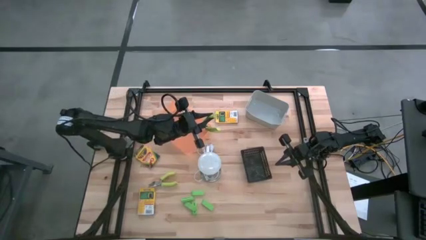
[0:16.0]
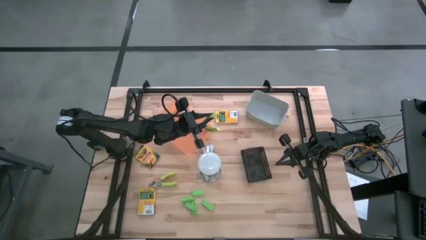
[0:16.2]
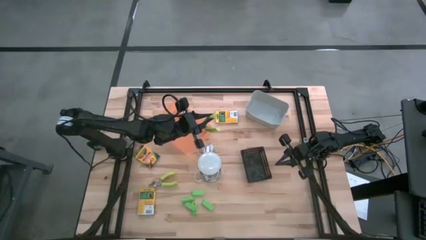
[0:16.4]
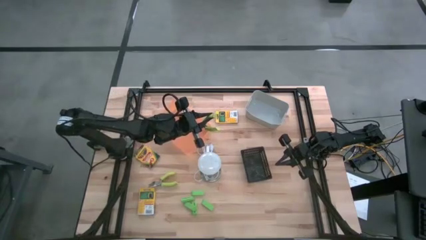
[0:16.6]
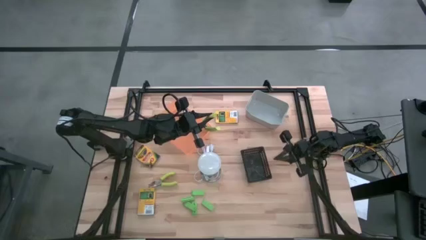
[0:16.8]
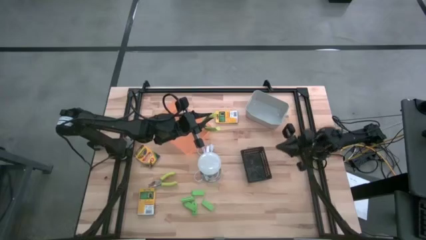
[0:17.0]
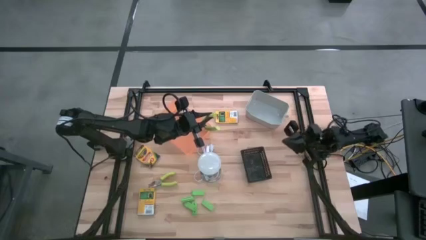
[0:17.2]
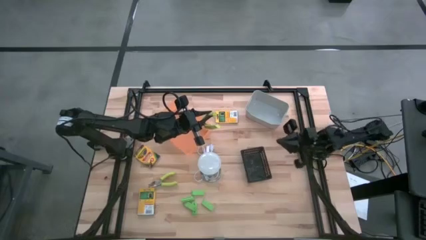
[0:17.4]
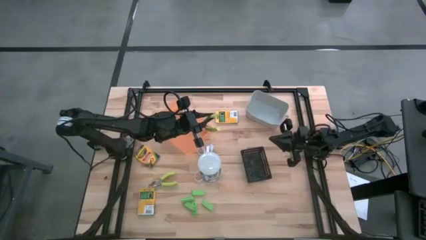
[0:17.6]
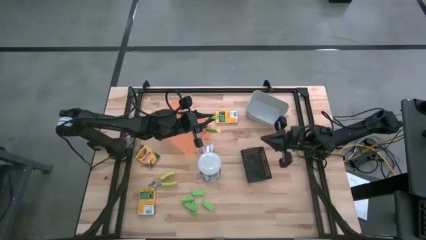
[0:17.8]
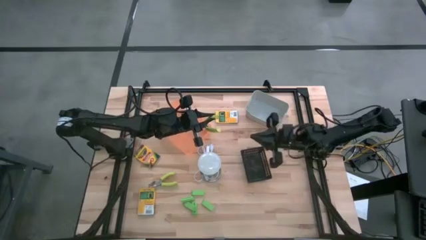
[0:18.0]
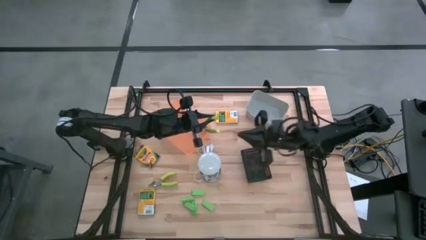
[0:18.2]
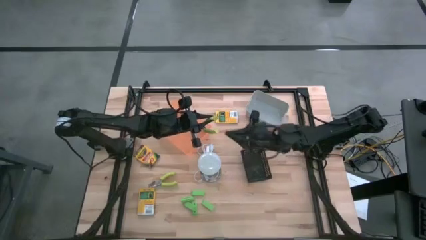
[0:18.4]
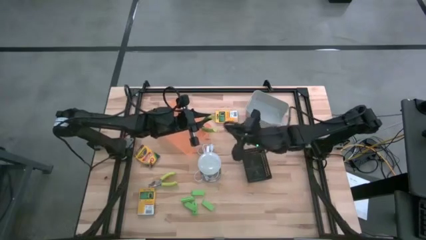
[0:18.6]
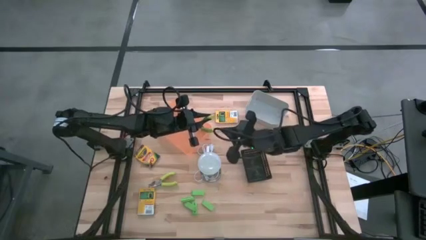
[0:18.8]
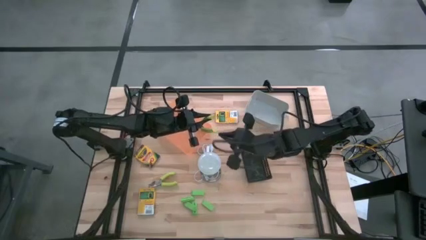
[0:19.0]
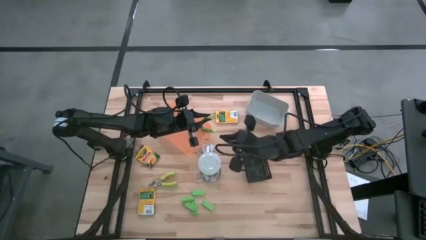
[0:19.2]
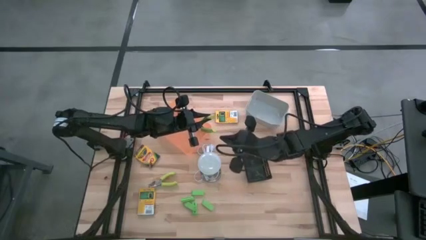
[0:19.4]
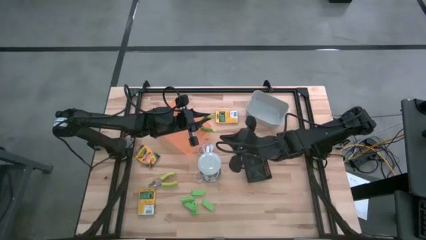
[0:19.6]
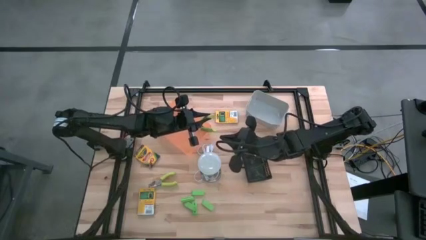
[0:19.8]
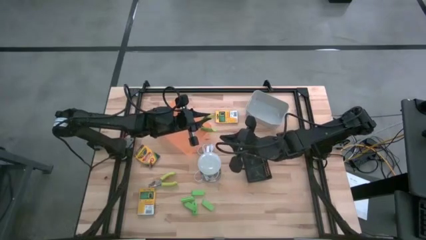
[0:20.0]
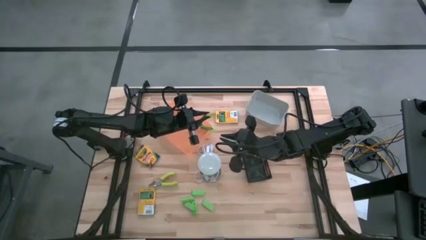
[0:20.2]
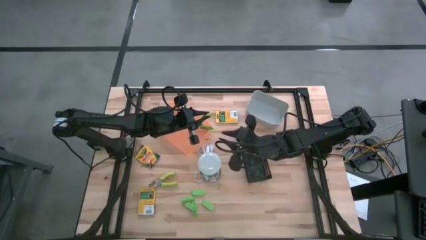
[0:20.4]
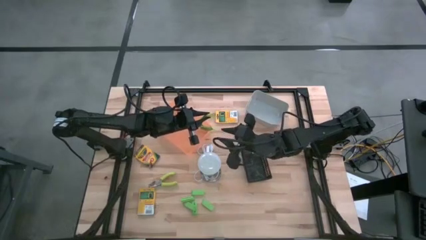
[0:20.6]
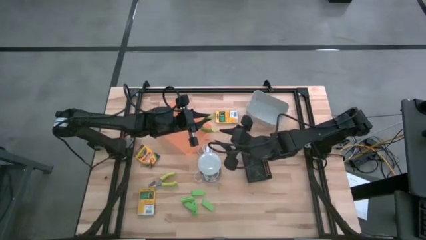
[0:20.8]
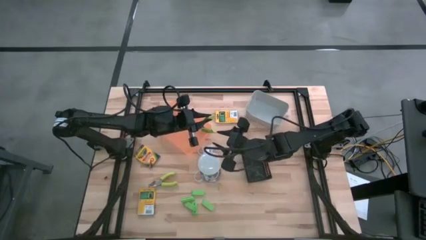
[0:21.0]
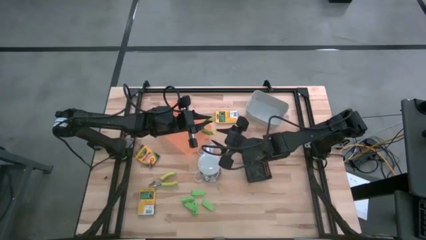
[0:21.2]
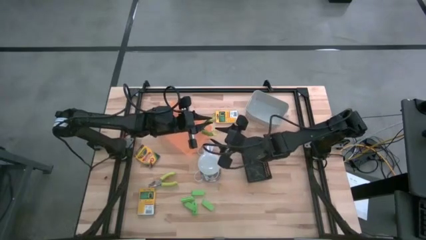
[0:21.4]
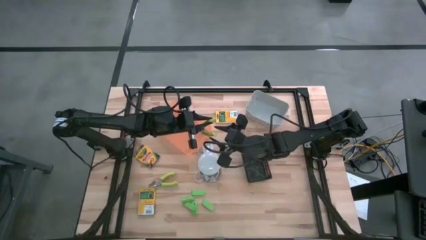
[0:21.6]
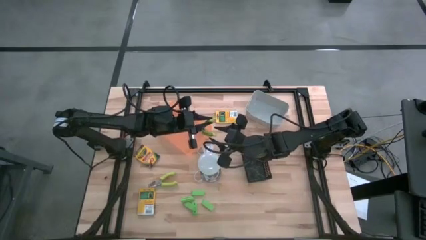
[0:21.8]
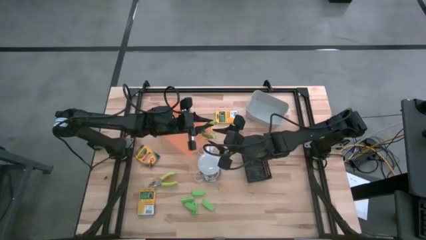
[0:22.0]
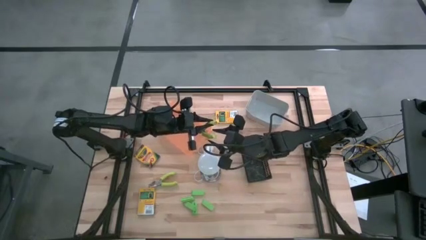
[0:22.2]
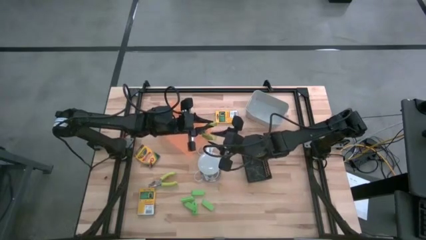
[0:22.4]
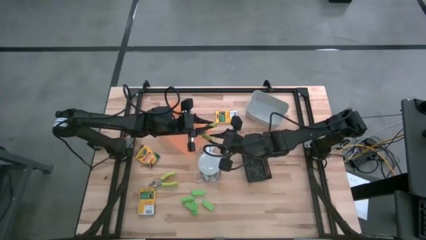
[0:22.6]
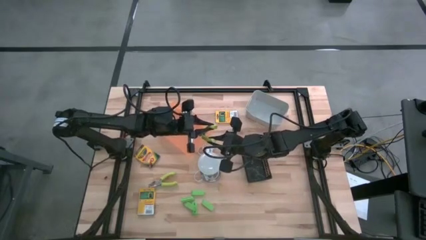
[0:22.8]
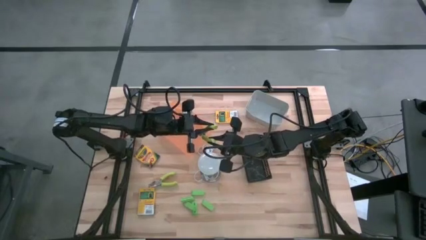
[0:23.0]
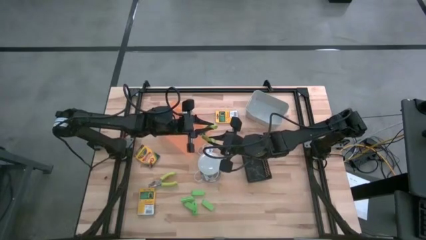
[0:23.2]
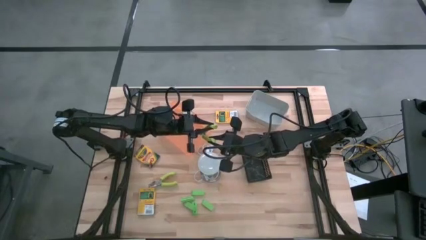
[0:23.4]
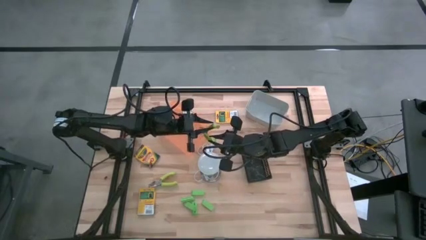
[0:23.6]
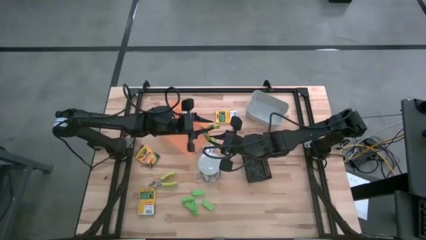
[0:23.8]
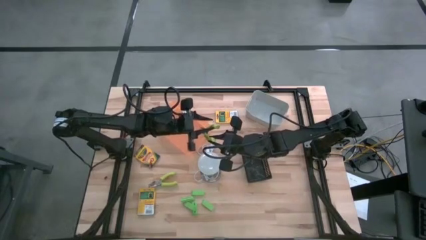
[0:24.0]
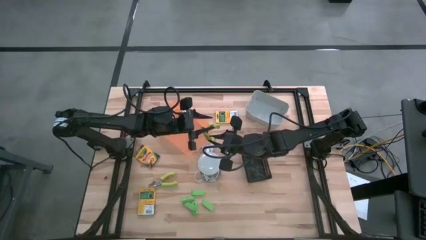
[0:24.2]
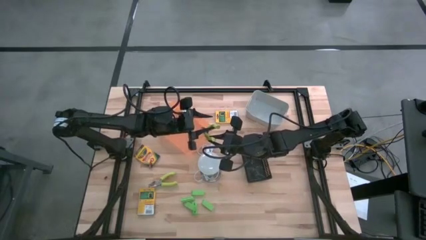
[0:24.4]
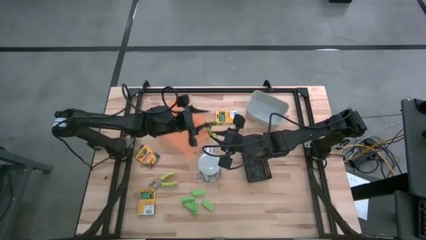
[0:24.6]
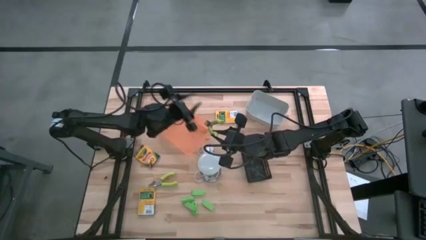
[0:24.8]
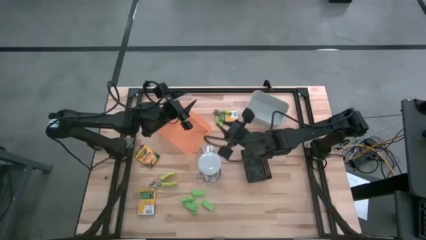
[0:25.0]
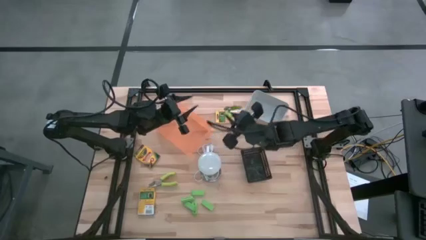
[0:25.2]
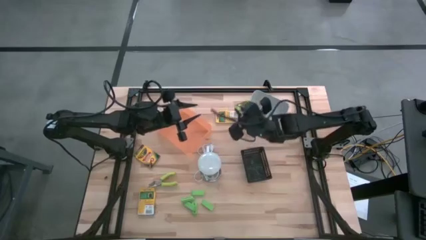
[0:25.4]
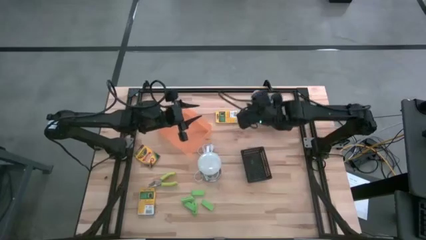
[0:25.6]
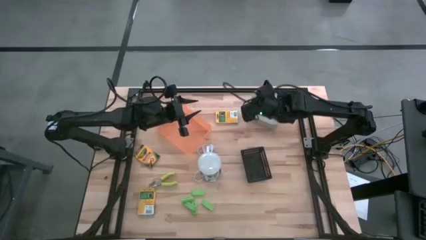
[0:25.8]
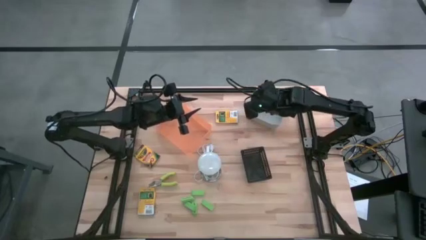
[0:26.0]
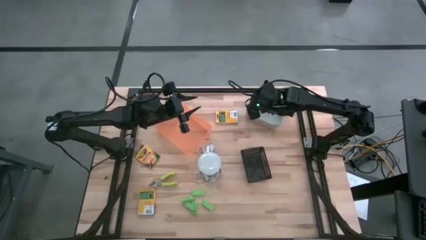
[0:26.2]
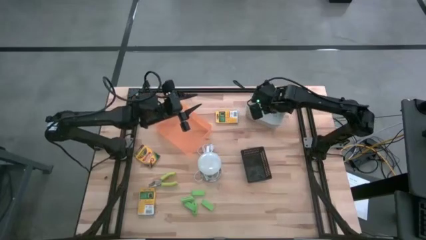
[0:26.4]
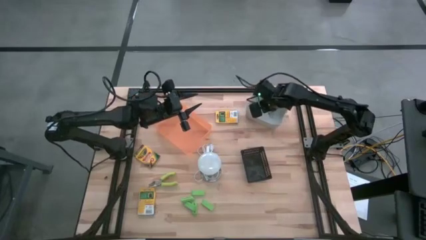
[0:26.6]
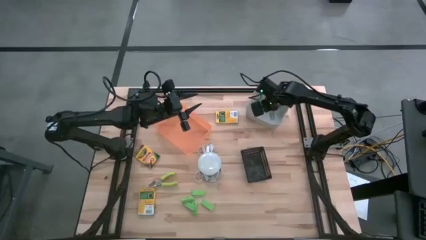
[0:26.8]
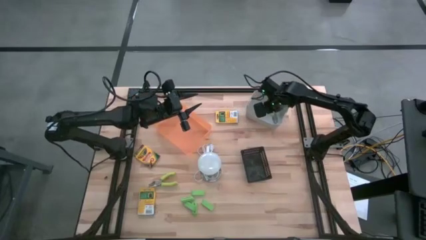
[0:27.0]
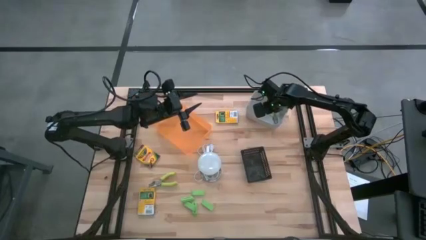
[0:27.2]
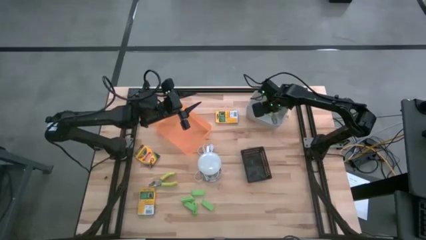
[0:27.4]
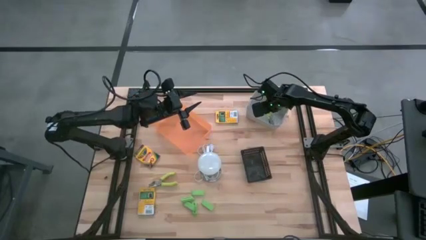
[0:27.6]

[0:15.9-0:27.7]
Task: Pick & Place School Supplies
Put the green punch plier into the gray bin

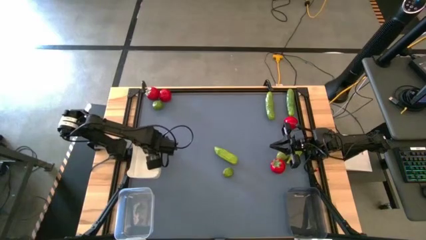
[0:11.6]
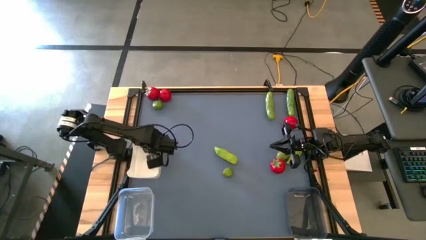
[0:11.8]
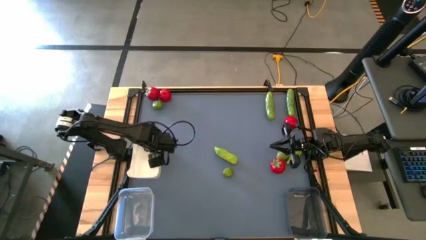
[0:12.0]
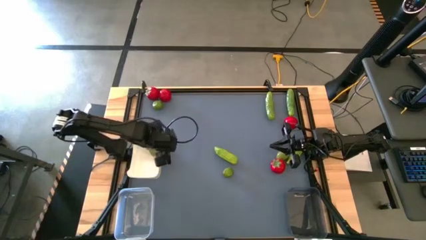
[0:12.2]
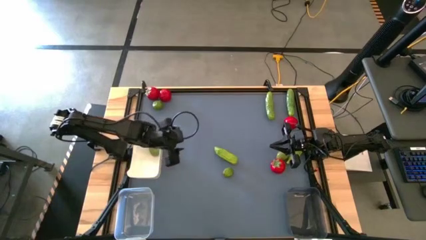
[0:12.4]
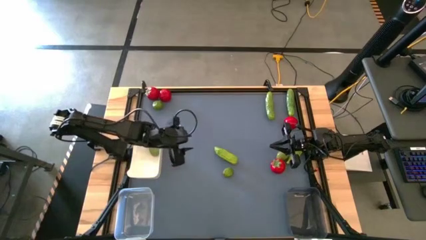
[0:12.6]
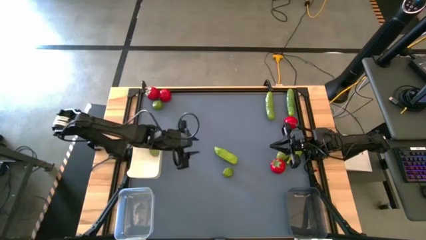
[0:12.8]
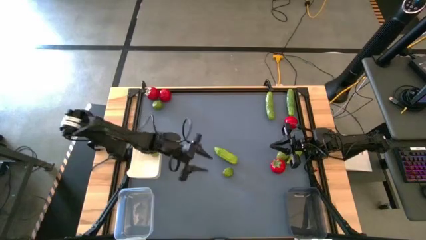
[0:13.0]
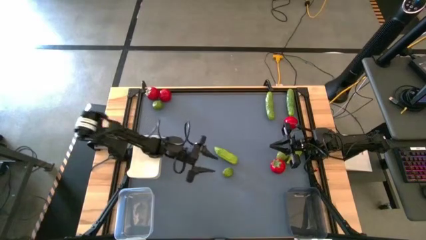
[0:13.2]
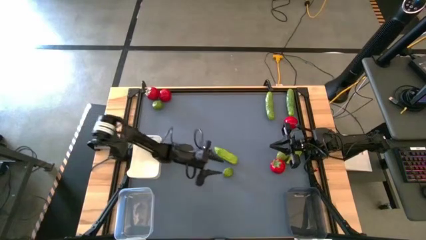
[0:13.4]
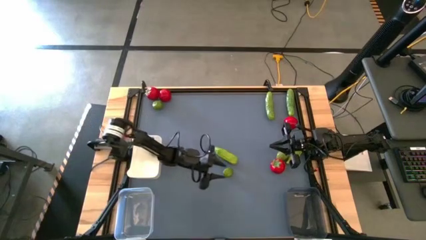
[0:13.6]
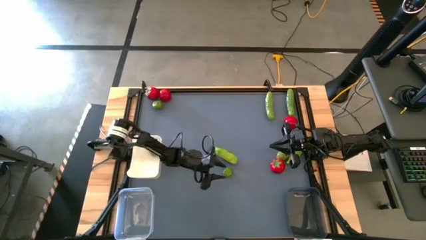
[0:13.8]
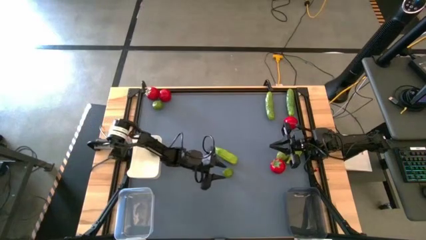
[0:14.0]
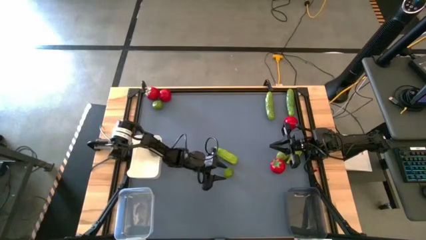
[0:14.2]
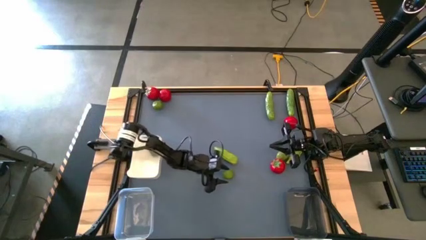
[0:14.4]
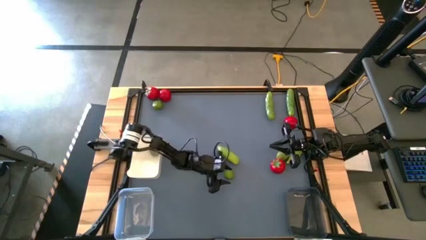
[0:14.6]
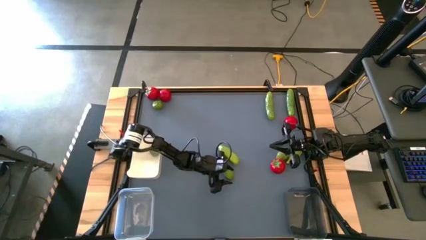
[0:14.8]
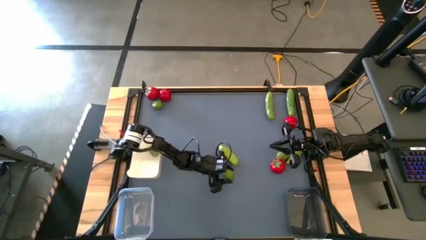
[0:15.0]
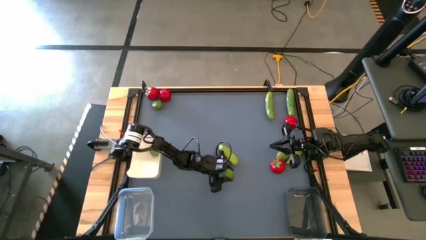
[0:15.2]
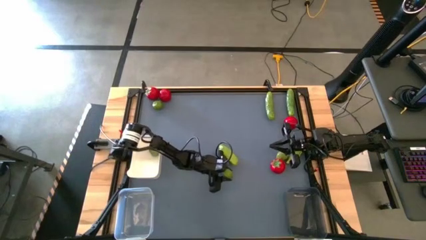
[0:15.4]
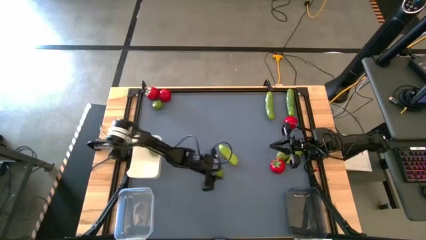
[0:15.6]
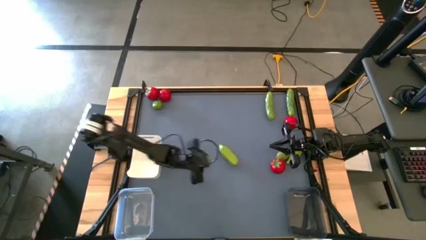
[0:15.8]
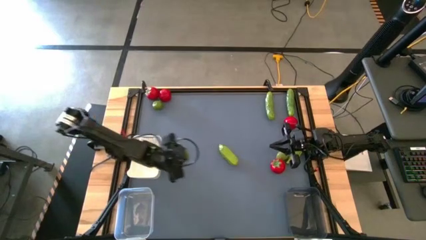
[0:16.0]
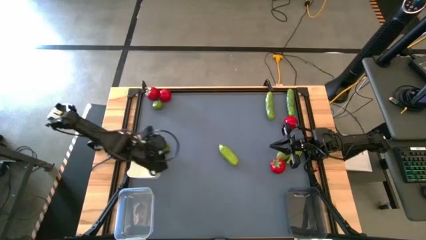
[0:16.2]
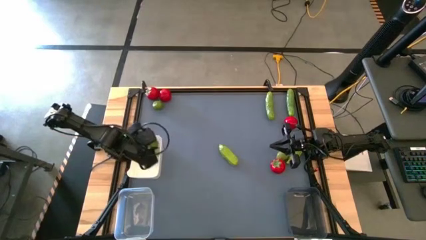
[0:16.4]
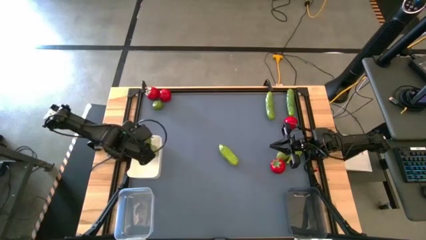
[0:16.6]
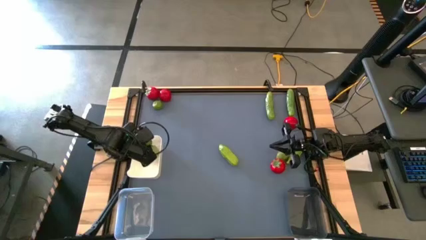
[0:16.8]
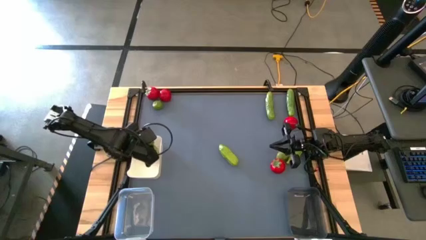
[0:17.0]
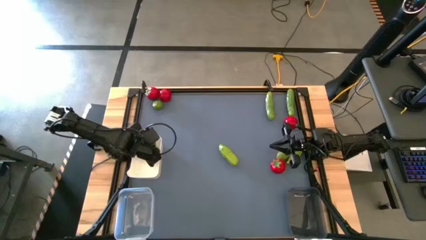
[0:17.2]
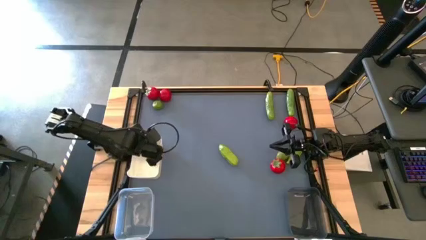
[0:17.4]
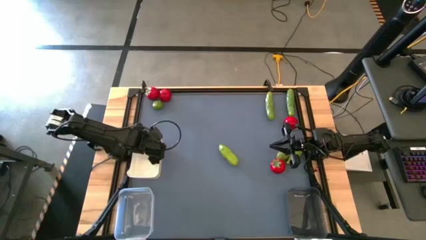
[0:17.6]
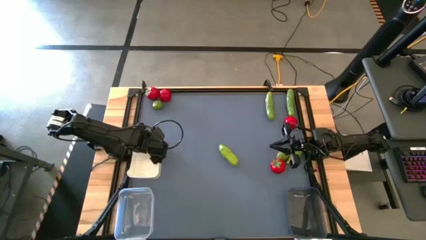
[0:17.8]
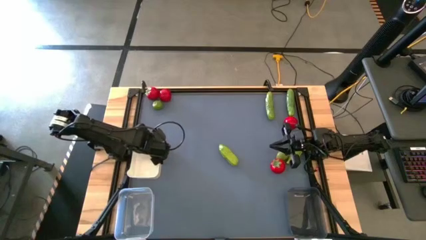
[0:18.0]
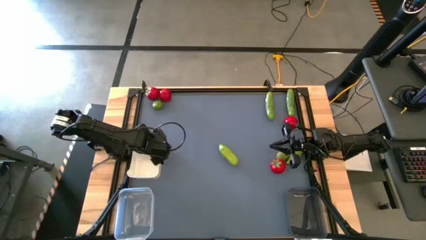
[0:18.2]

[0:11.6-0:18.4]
Task: Sort produce into baskets
Put the green lime into the white bin
